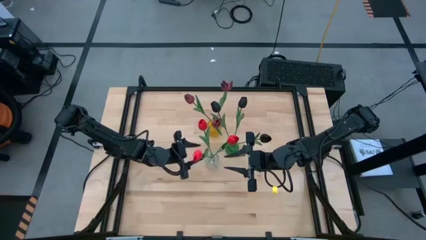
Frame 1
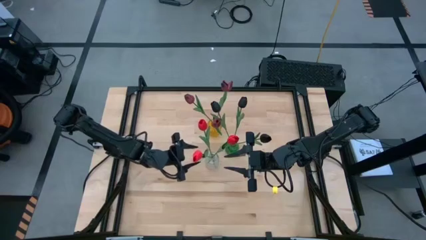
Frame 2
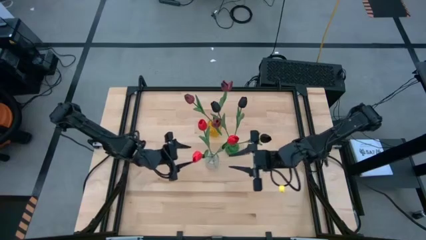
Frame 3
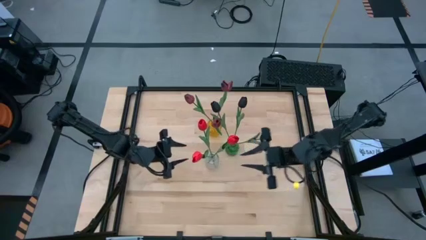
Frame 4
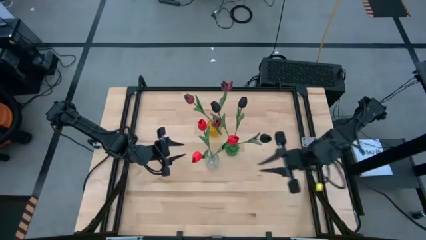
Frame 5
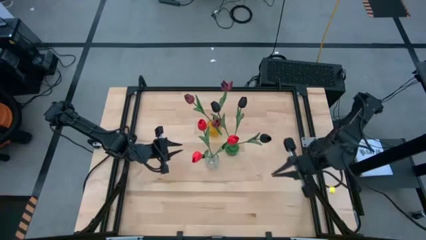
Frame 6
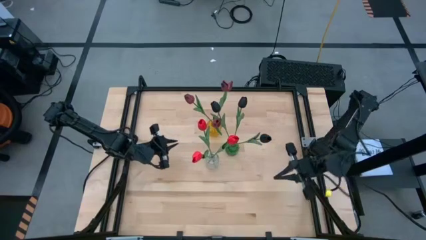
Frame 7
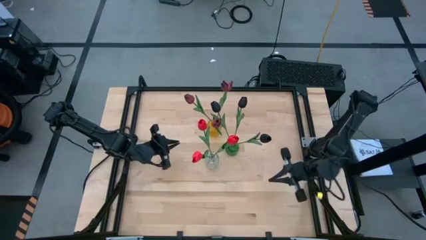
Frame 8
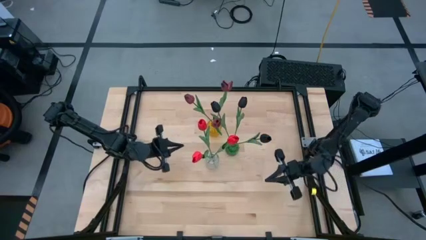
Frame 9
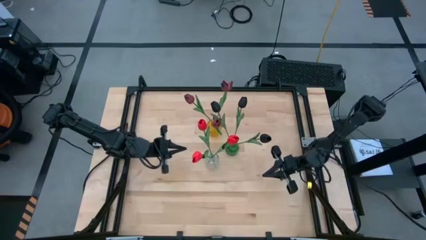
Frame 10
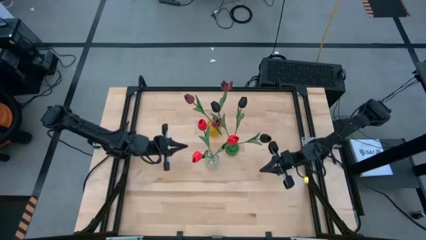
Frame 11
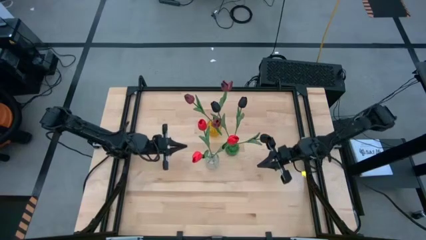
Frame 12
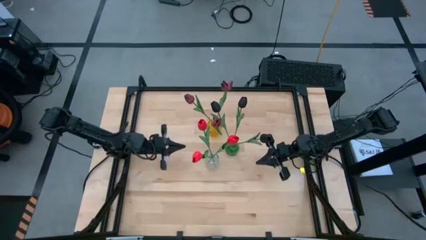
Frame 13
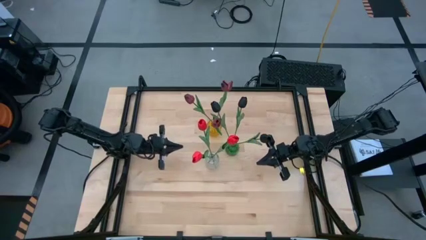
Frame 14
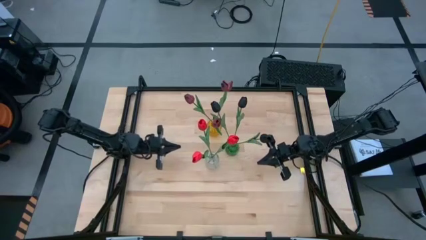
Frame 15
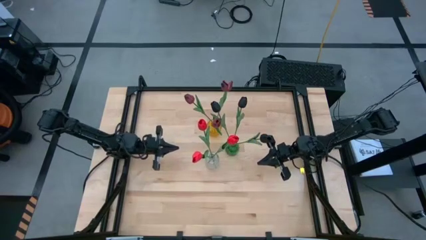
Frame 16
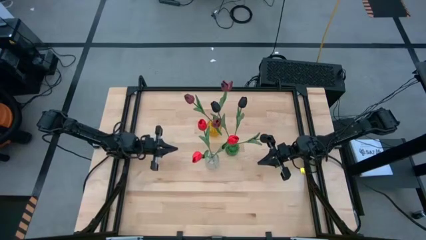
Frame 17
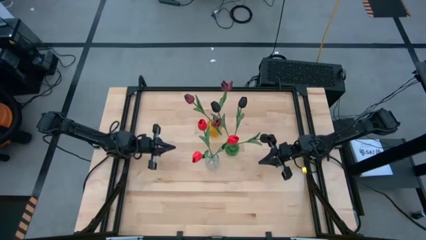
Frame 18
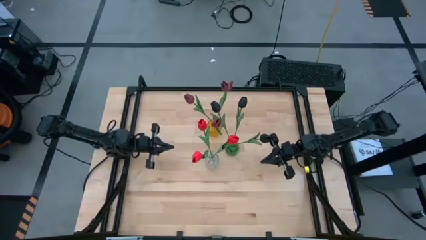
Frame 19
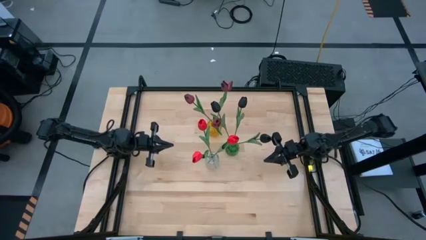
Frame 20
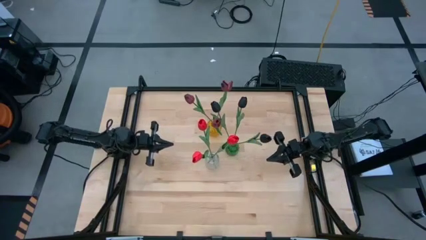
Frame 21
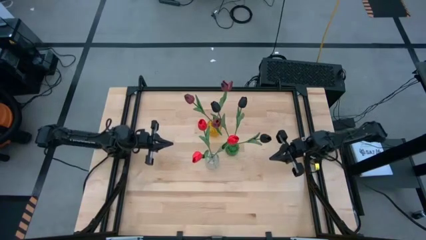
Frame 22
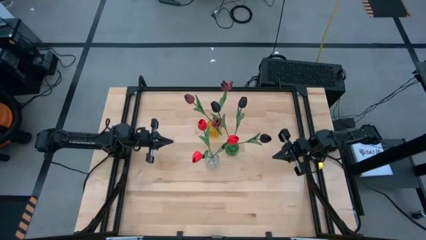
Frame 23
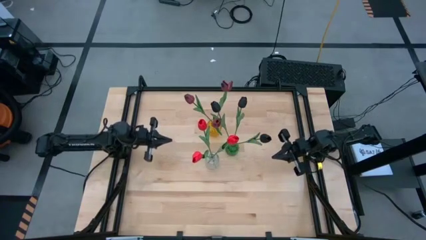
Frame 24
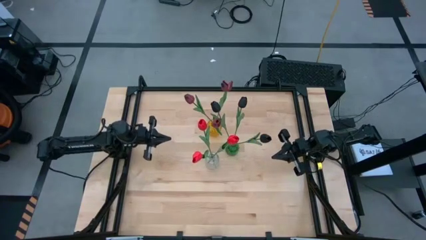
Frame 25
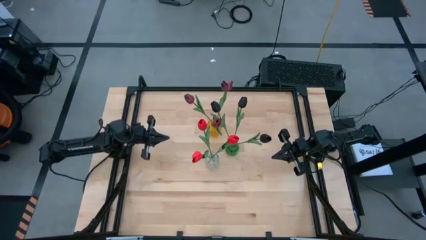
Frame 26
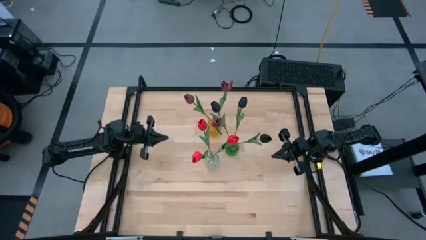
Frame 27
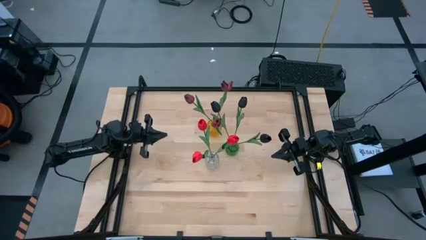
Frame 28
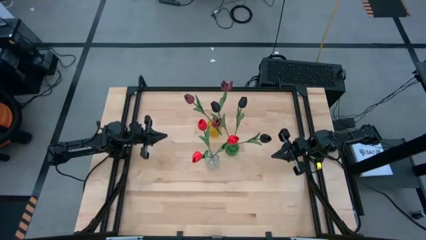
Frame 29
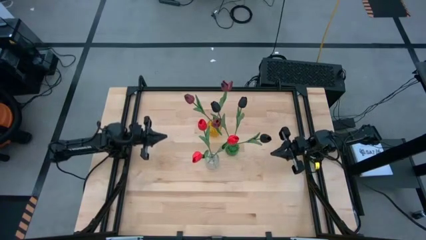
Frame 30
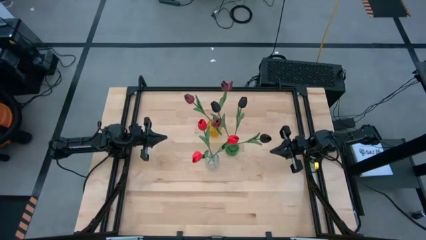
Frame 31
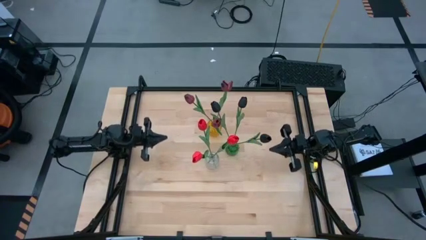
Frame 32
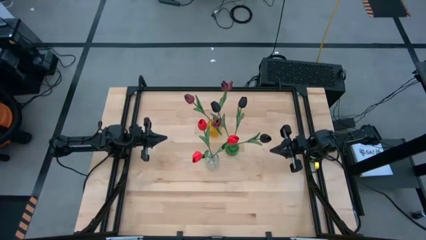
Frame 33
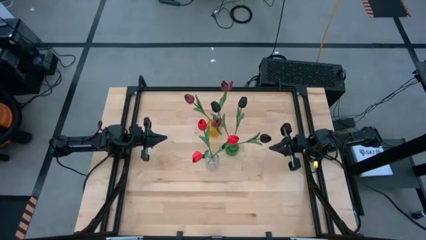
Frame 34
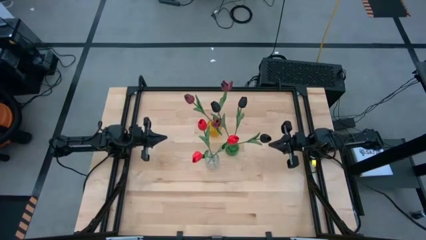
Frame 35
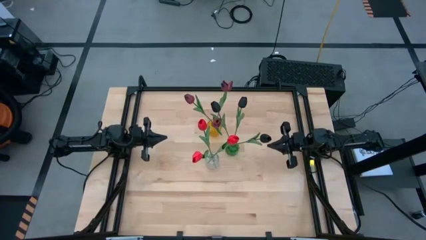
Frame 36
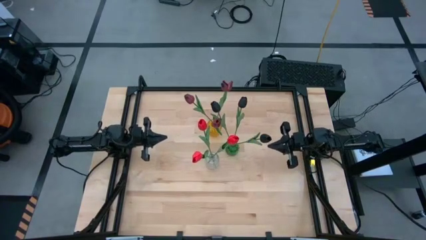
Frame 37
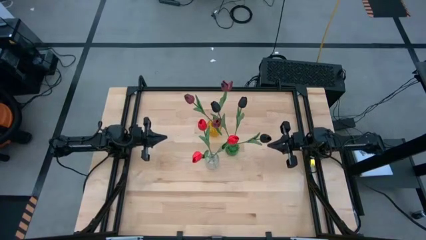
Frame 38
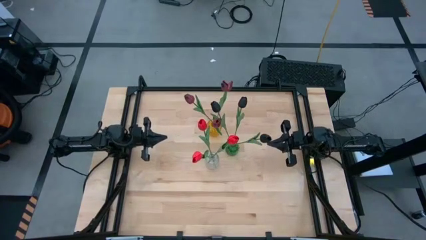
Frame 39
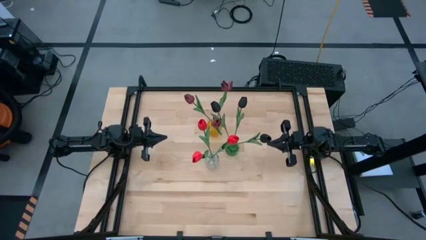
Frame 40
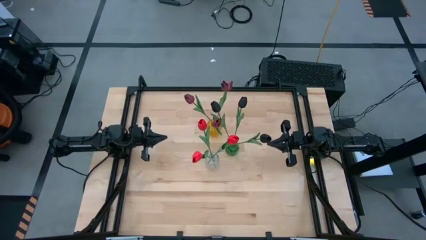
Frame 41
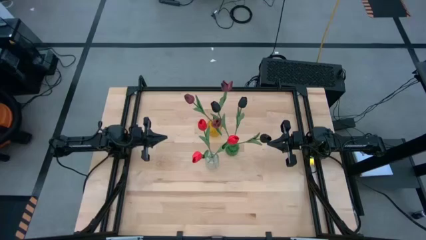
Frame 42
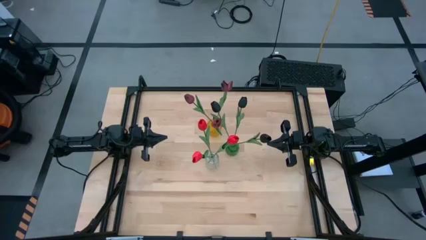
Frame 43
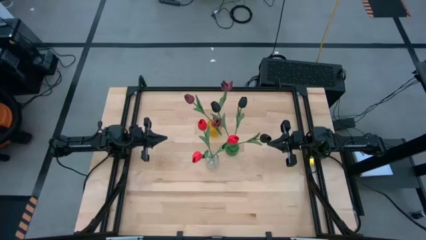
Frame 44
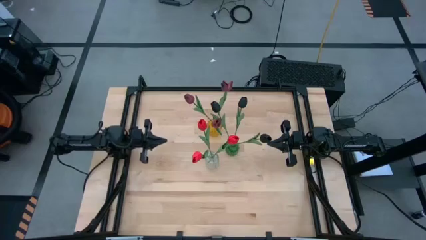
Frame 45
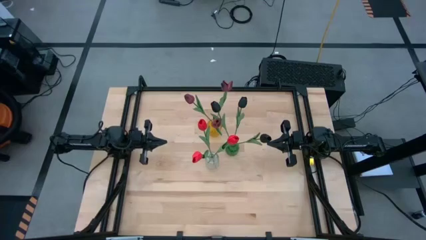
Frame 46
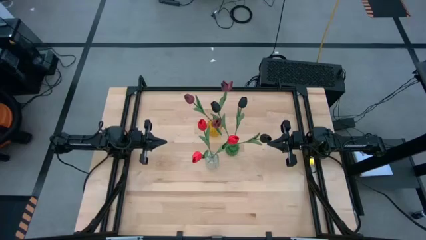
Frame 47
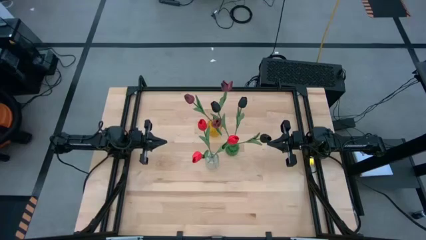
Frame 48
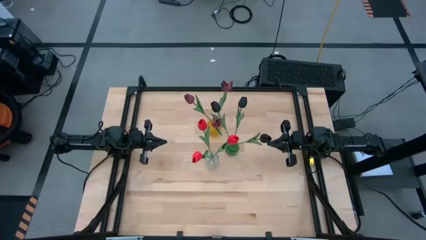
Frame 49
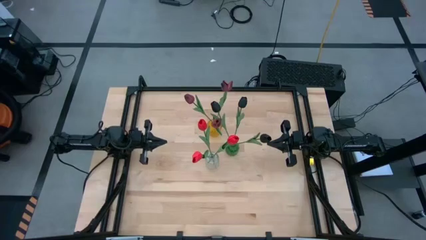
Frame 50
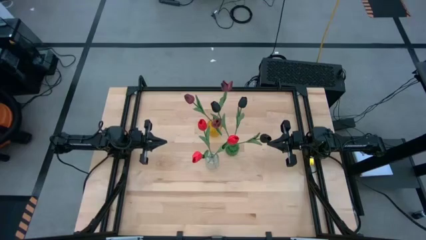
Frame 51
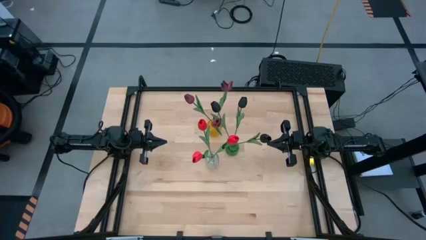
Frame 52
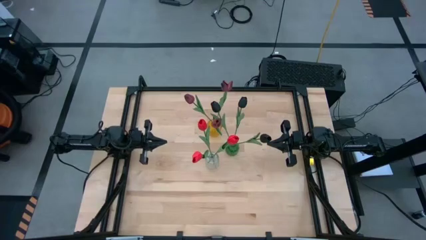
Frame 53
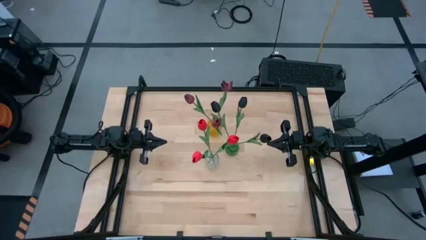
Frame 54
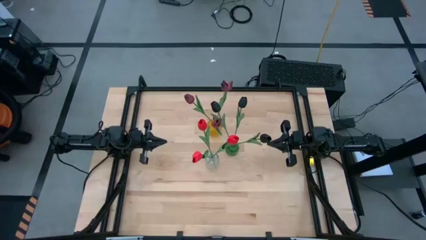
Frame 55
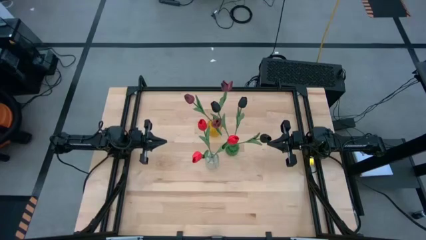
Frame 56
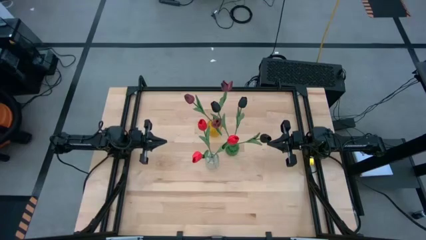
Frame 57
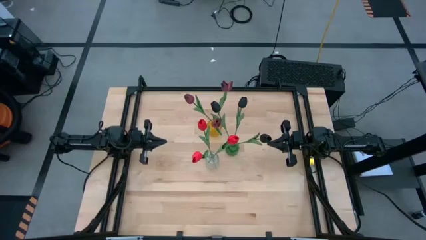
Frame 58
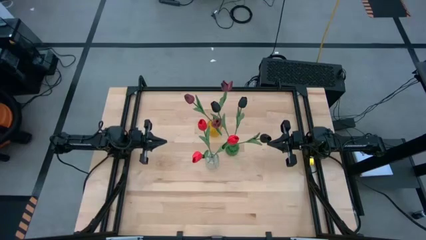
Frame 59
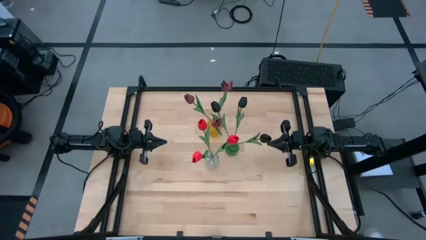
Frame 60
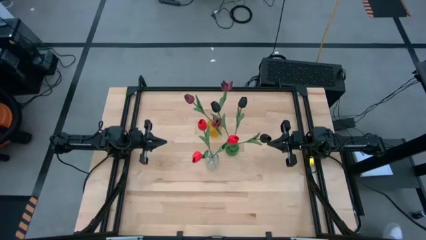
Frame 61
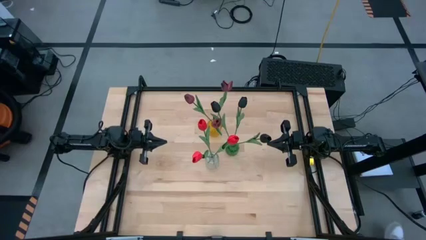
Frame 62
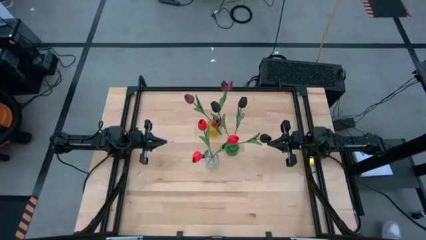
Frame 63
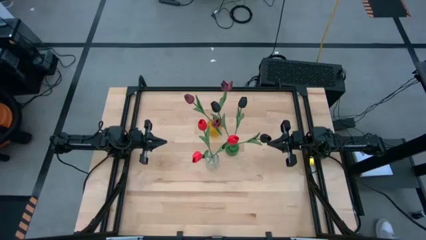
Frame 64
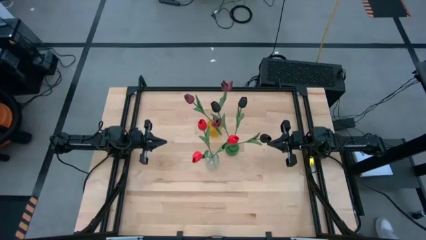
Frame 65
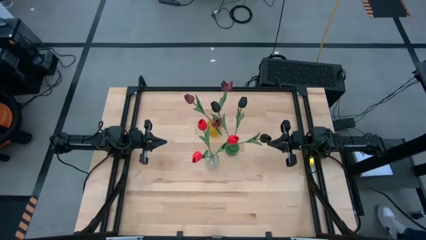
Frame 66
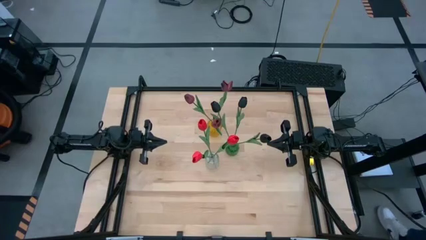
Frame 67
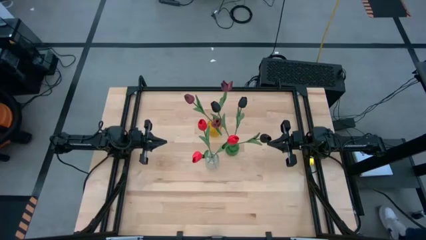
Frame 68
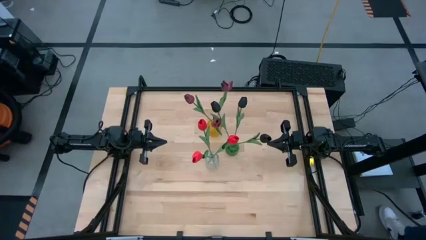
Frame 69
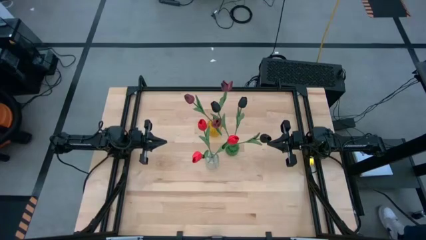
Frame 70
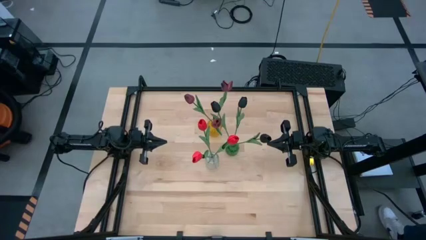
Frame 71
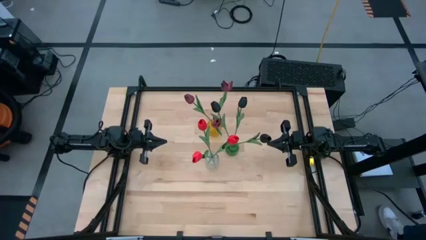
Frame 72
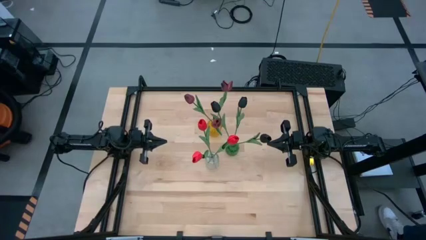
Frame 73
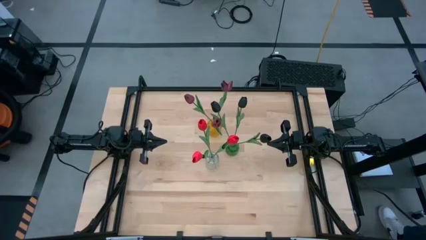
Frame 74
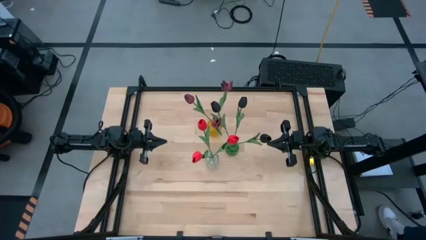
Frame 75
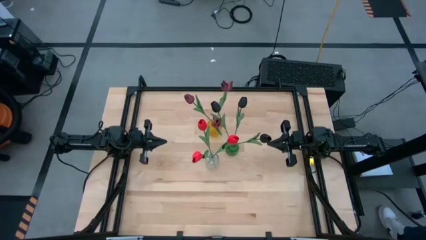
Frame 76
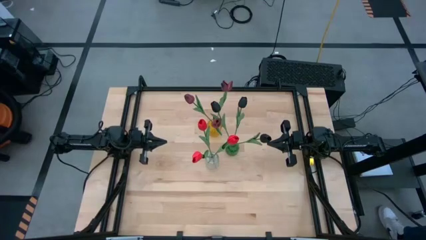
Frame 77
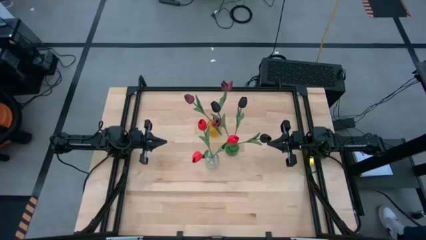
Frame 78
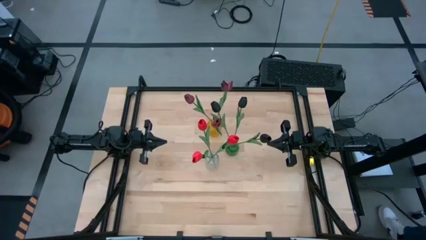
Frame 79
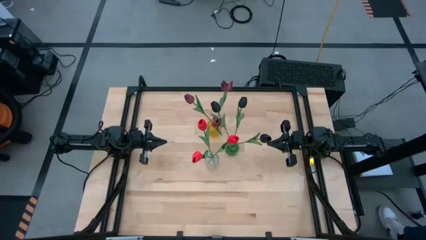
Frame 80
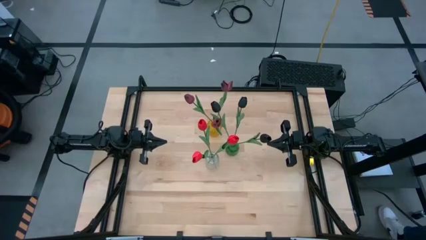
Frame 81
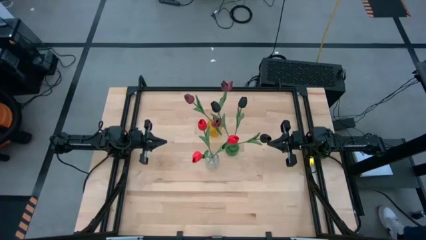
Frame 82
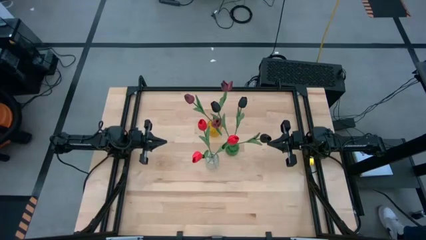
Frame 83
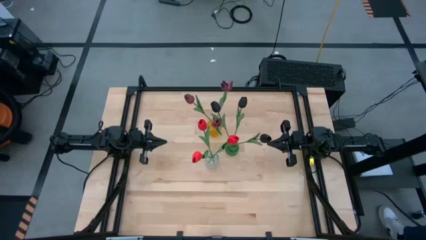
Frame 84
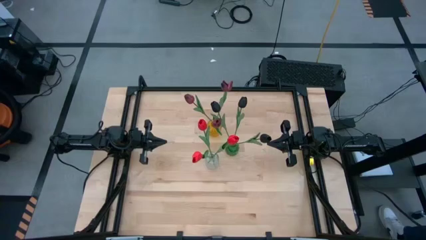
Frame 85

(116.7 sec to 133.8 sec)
Task: Sort flowers into vase by color
Return to Home Position
